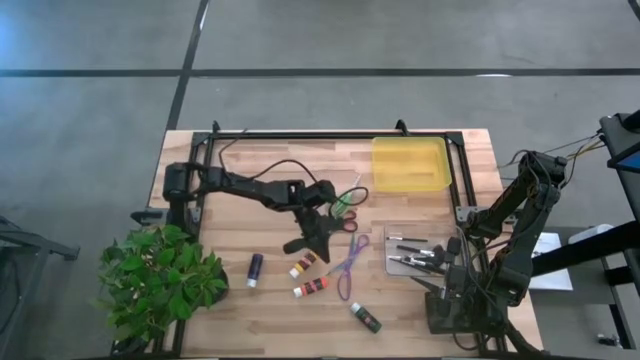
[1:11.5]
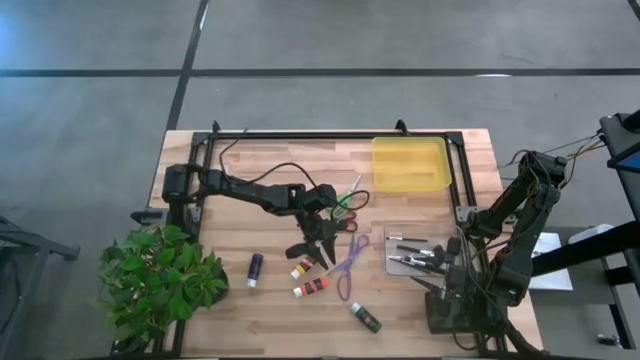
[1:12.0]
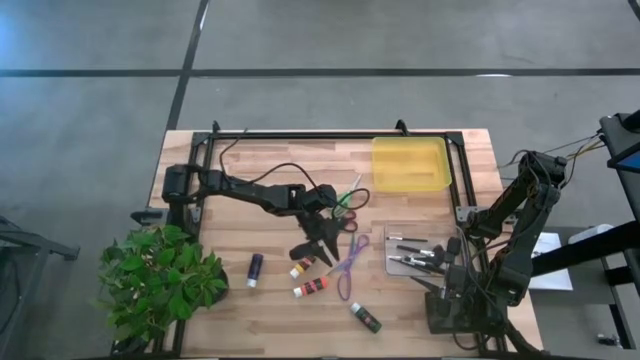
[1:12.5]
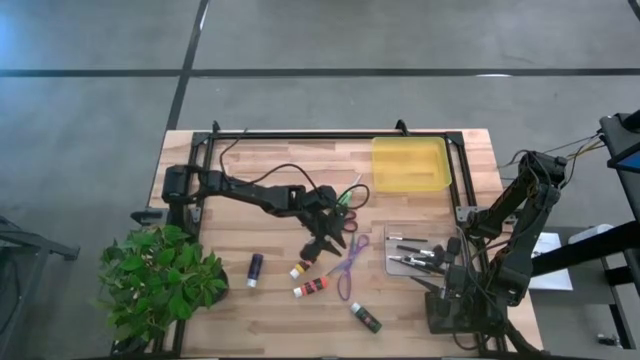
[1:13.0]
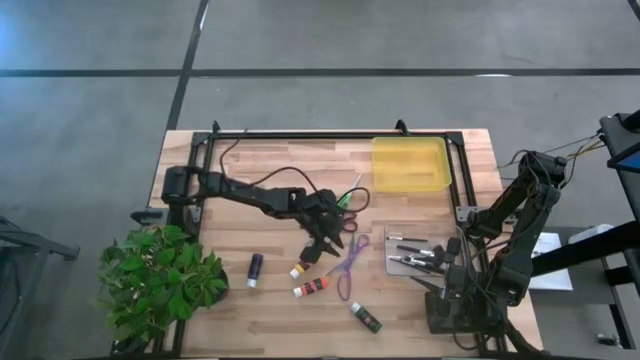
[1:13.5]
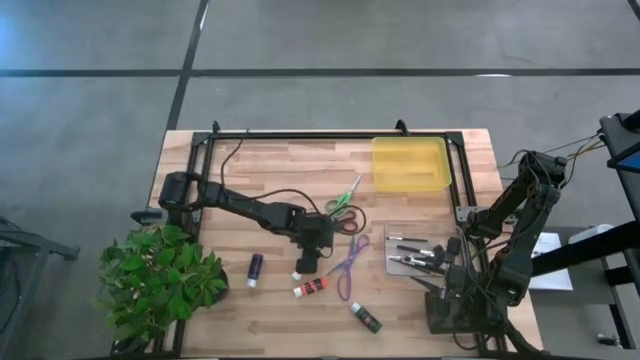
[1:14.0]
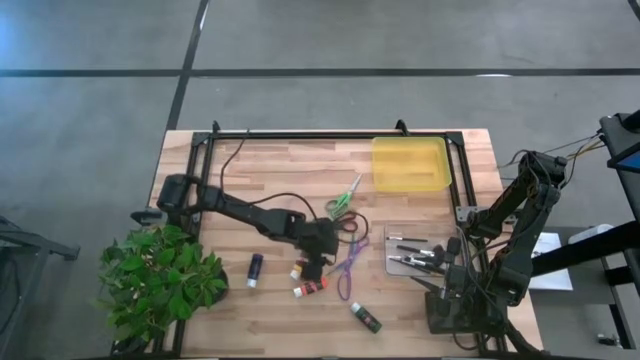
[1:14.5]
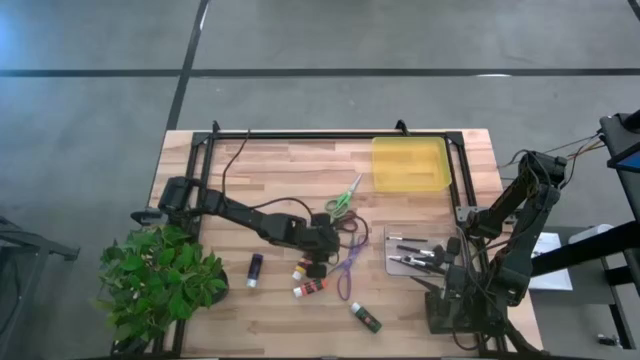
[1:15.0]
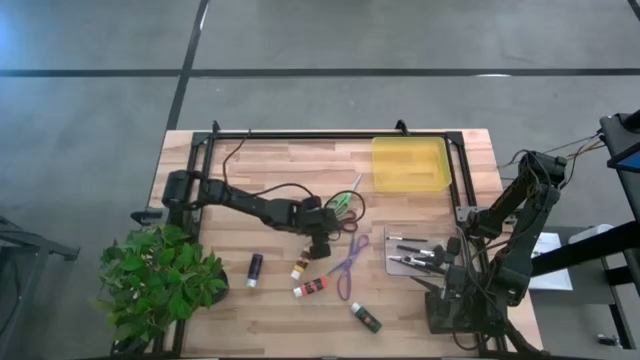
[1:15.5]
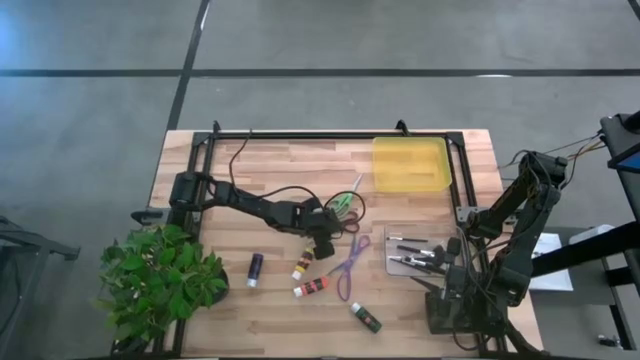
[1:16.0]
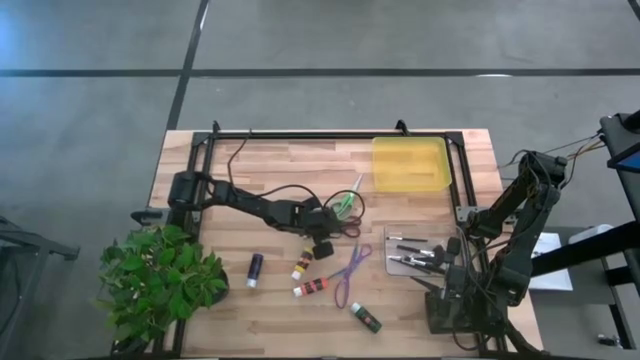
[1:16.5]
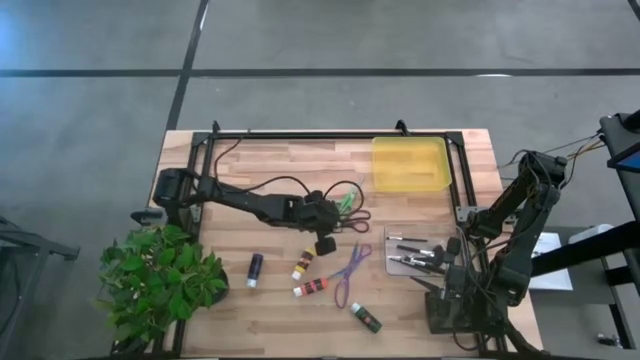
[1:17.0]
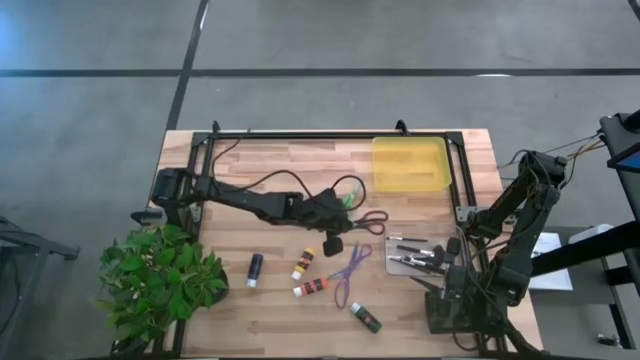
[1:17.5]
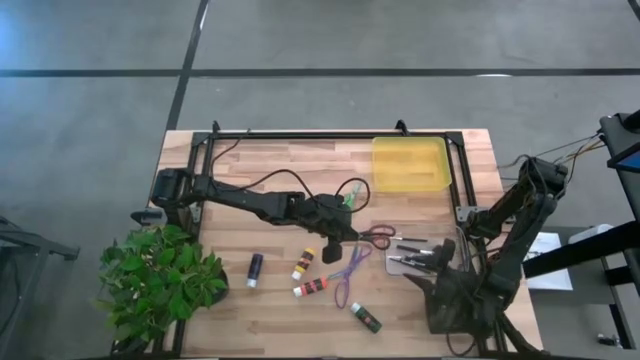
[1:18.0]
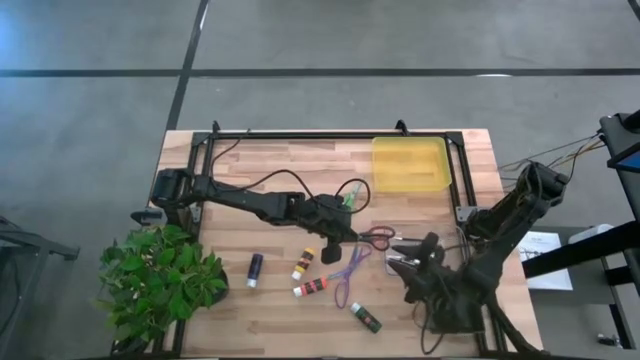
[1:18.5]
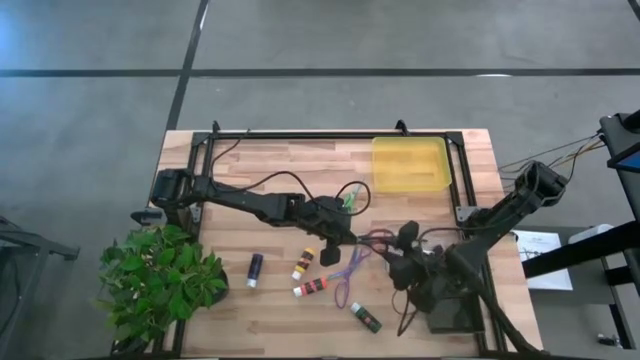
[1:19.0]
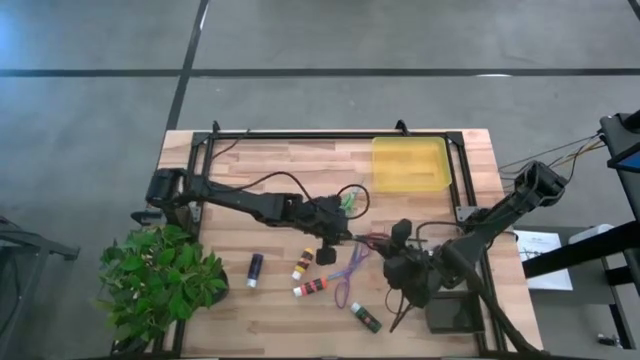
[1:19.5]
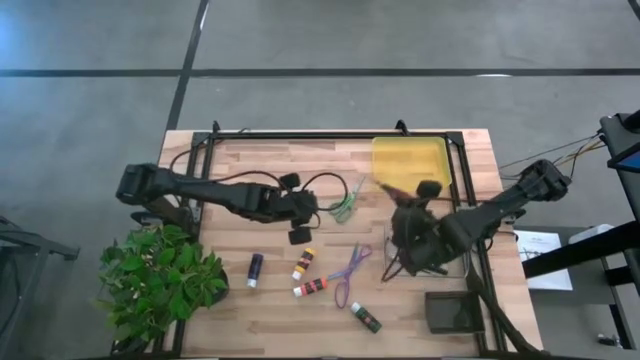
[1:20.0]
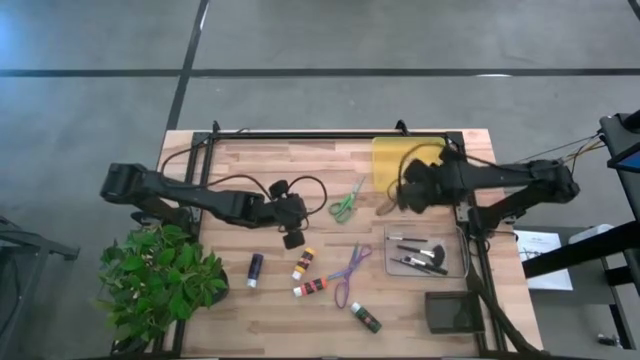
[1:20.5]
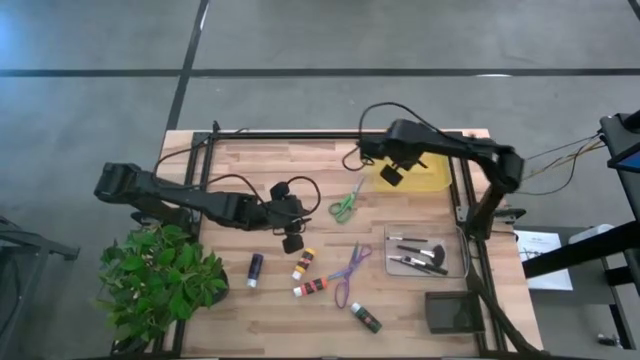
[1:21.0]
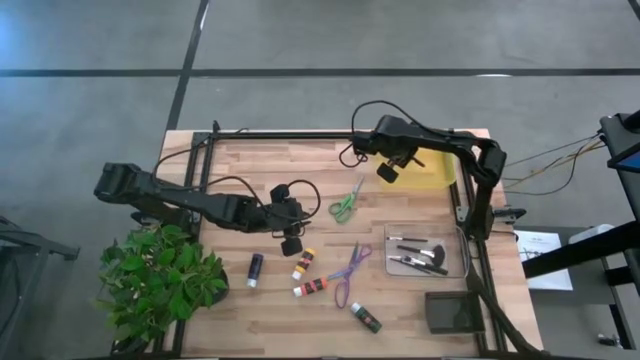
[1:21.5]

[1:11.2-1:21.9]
Task: Pick & Place Paint Supplies
Put the black scissors into the yellow bin

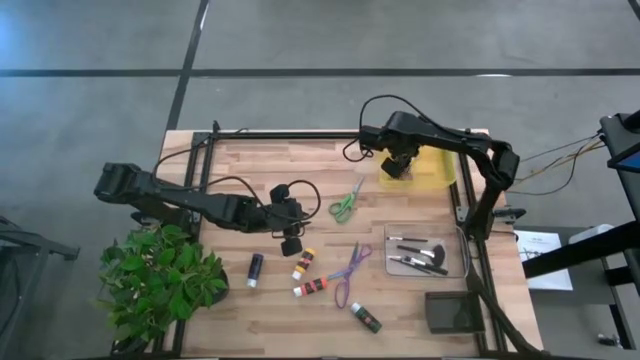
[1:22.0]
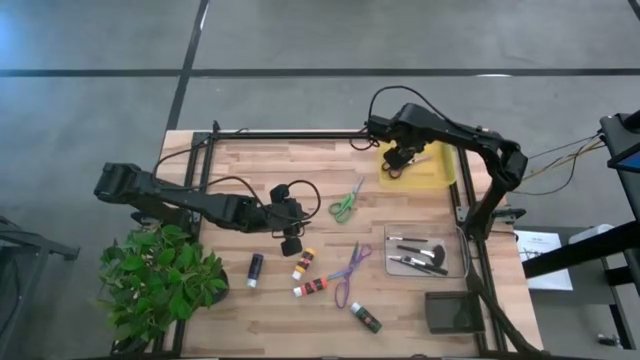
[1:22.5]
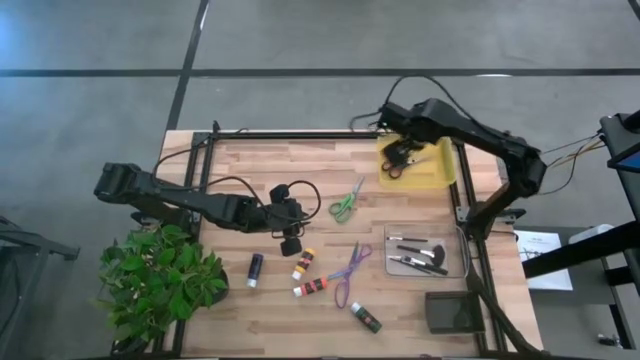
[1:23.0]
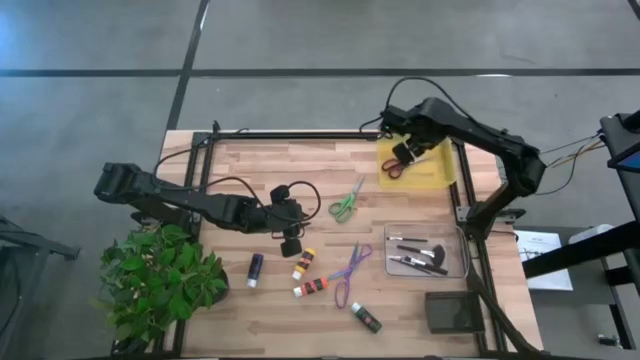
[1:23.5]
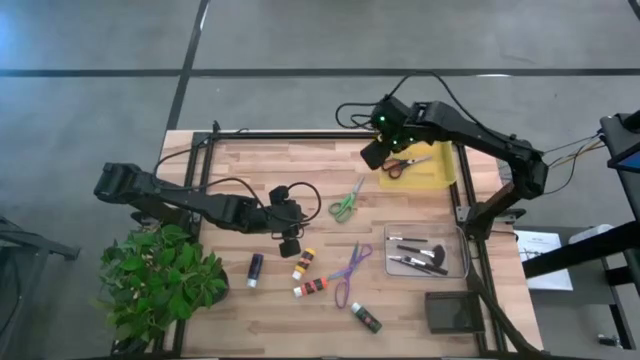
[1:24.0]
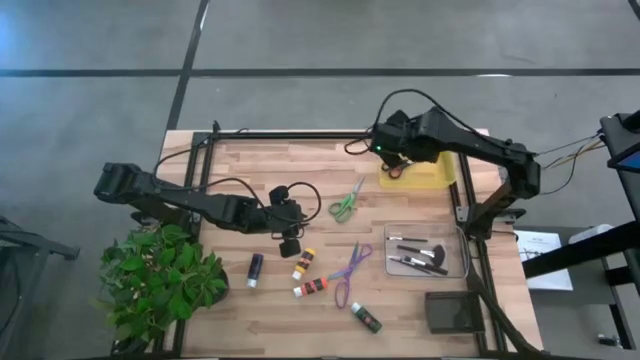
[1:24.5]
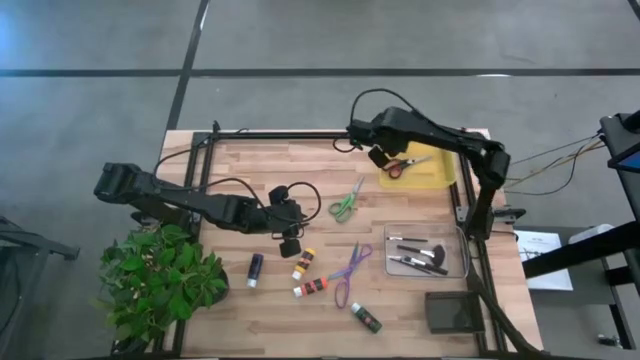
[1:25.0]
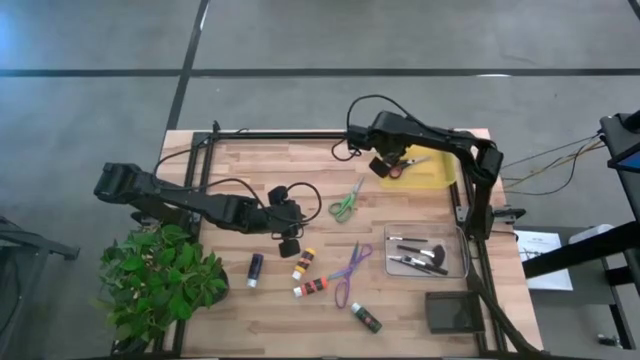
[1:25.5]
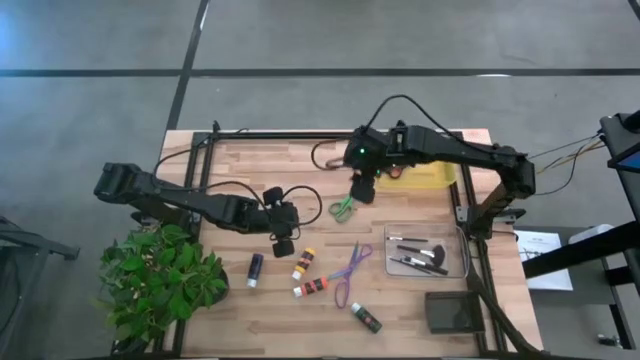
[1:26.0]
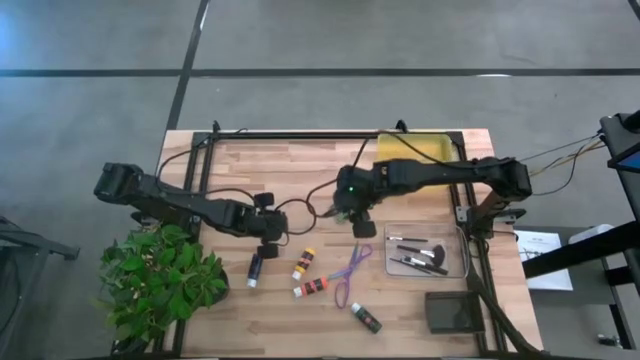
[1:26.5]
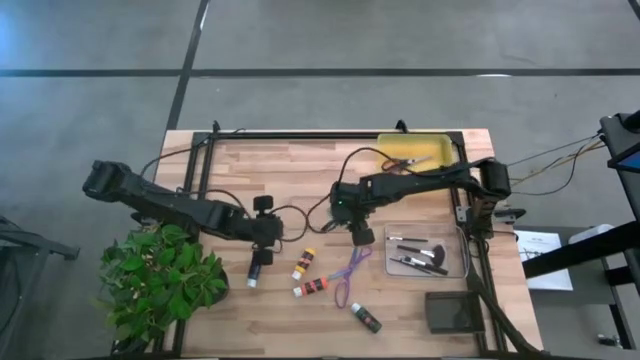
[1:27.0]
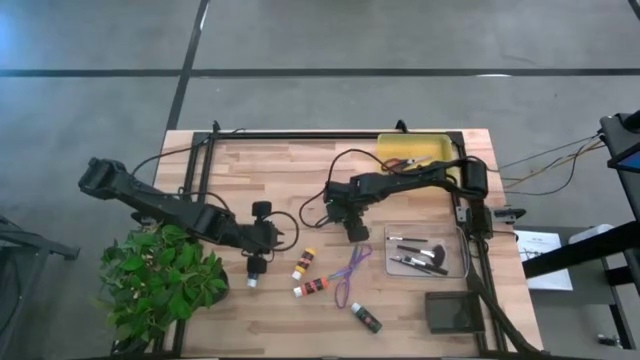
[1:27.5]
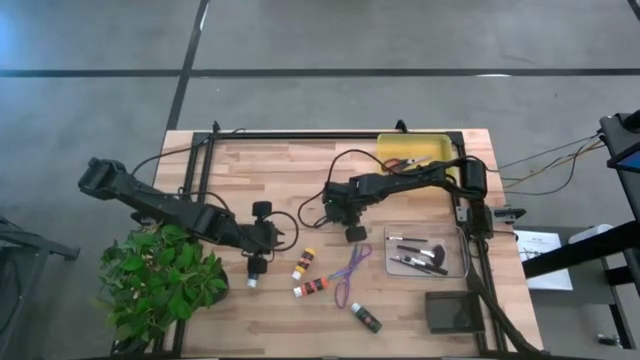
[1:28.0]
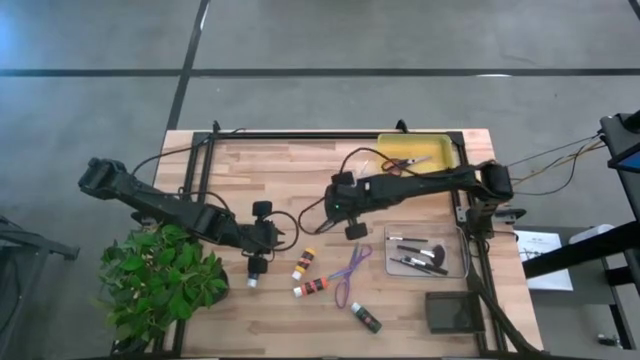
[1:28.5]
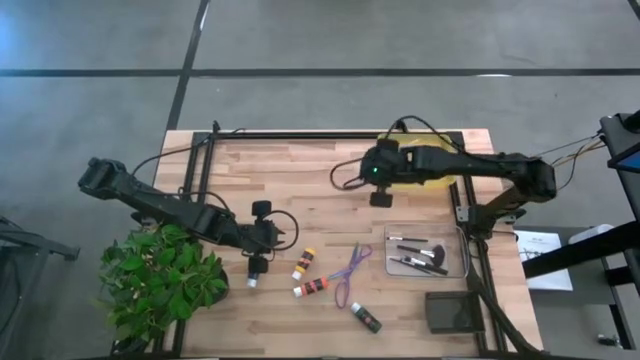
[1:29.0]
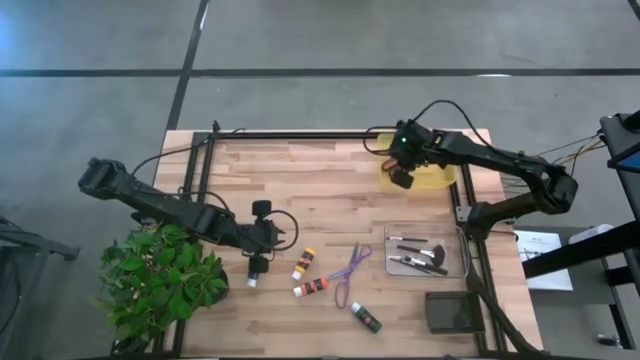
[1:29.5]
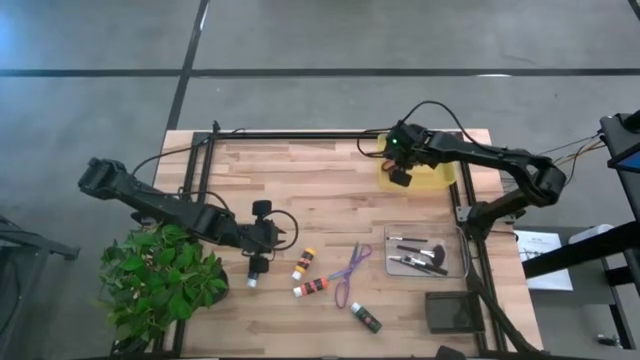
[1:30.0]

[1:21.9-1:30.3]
Put the green scissors into the yellow bin

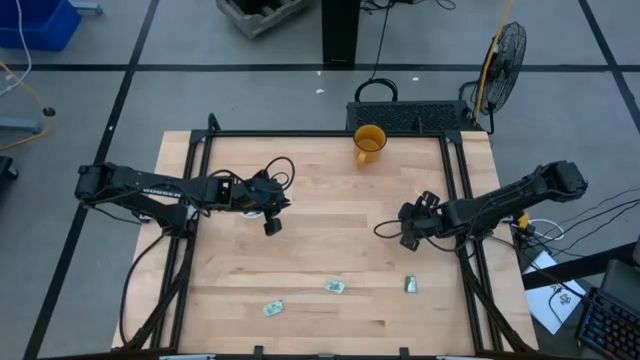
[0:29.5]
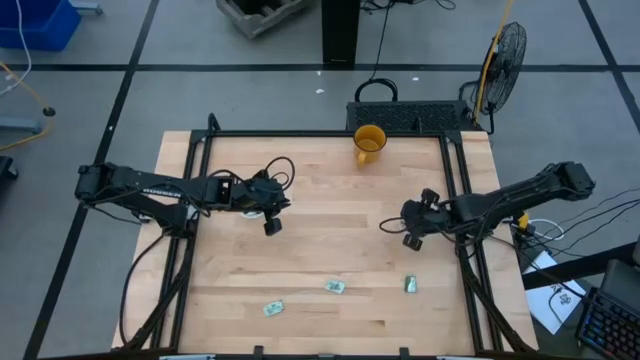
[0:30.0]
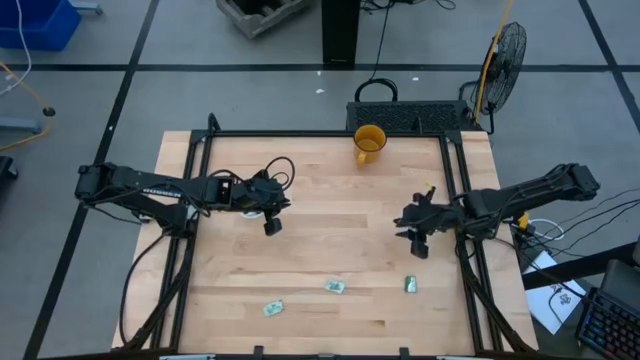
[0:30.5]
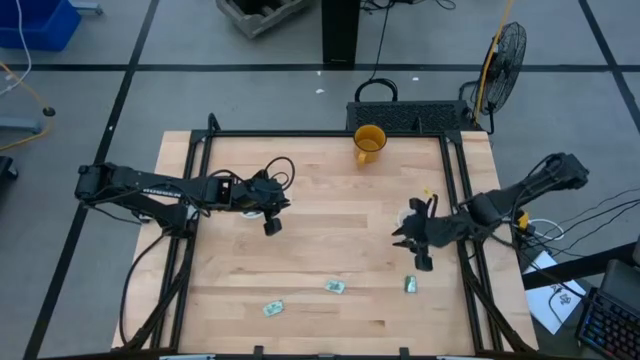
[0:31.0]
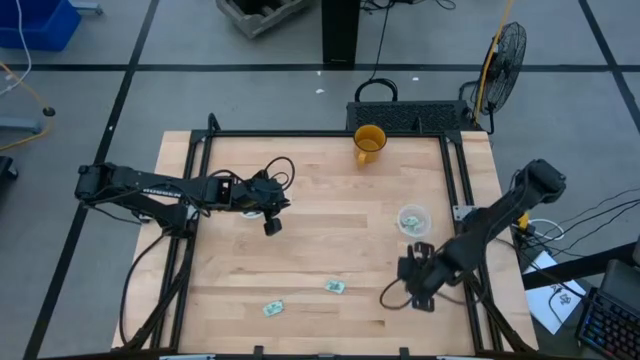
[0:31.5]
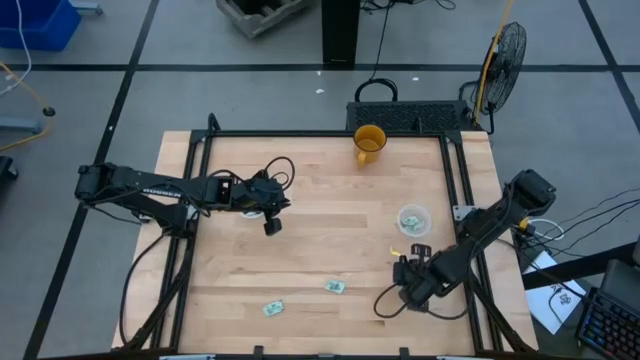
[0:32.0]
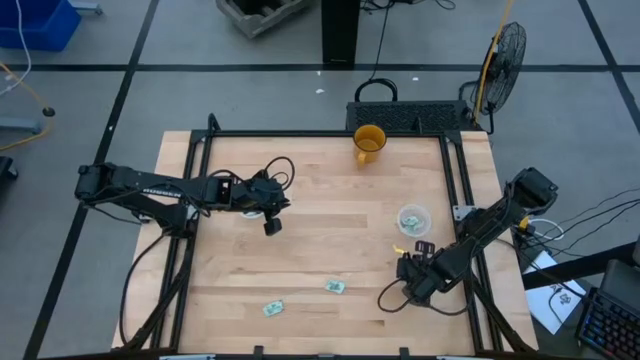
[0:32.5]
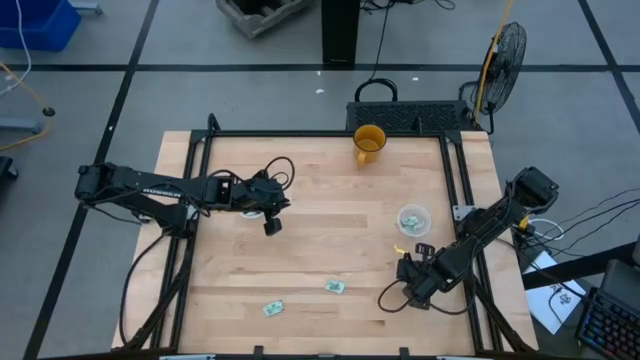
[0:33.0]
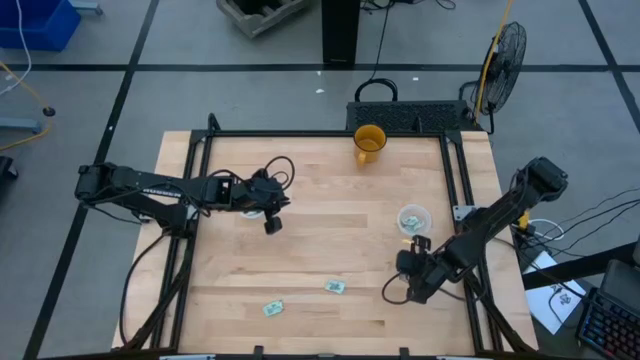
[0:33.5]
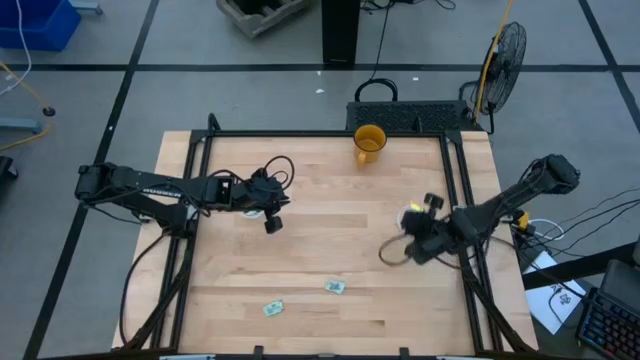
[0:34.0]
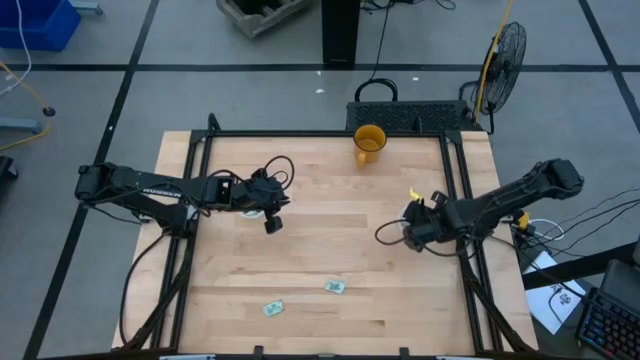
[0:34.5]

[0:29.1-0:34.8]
Task: Pick and place Stevia / Truvia into bins
Put the truvia packet into the right transparent container
